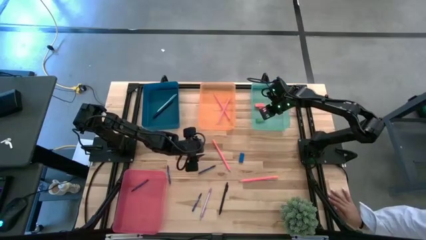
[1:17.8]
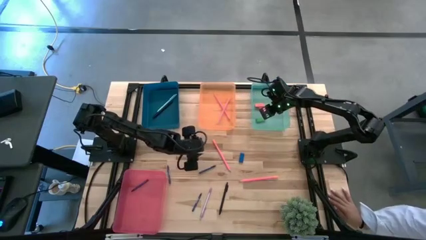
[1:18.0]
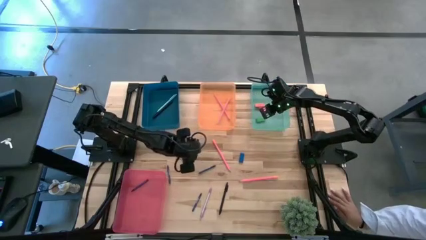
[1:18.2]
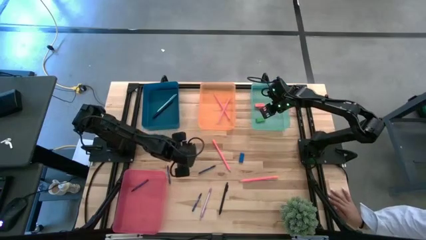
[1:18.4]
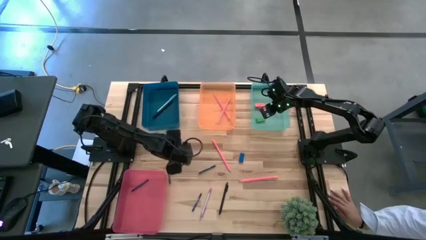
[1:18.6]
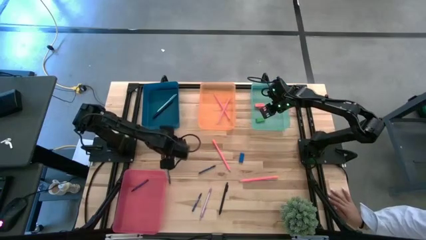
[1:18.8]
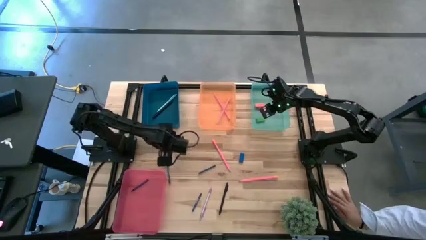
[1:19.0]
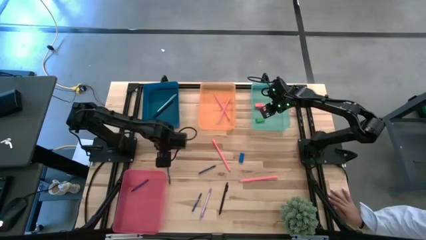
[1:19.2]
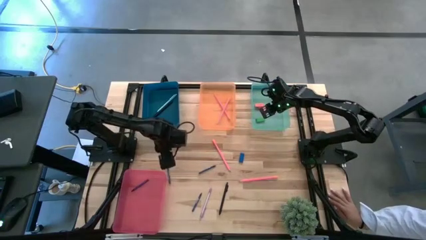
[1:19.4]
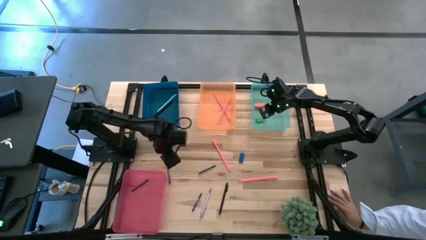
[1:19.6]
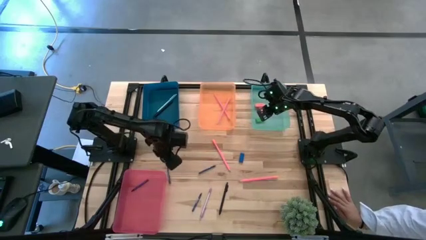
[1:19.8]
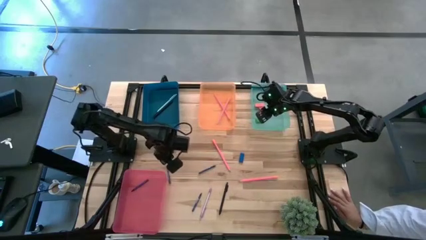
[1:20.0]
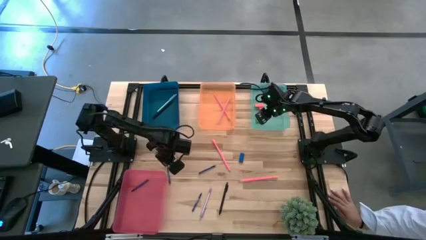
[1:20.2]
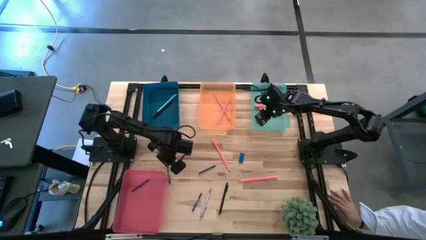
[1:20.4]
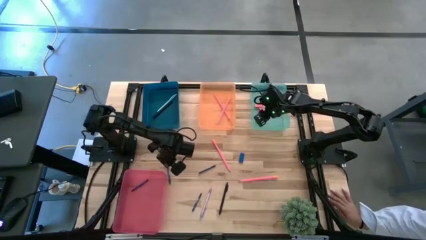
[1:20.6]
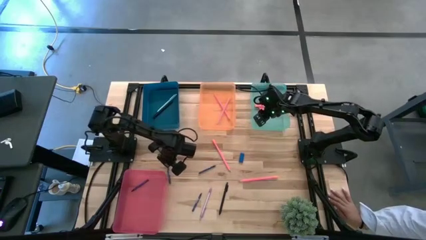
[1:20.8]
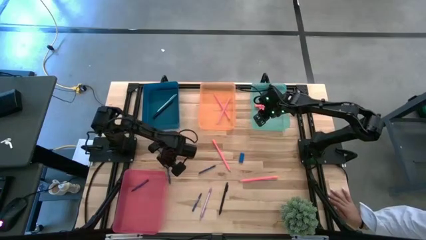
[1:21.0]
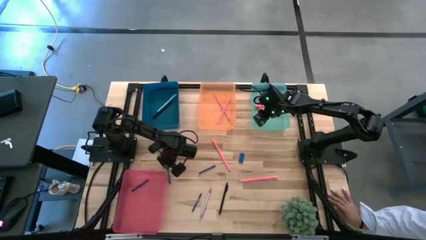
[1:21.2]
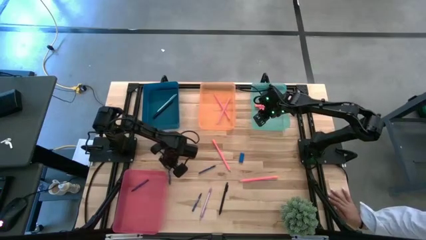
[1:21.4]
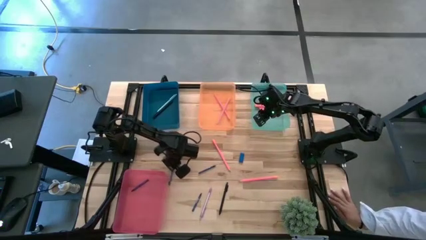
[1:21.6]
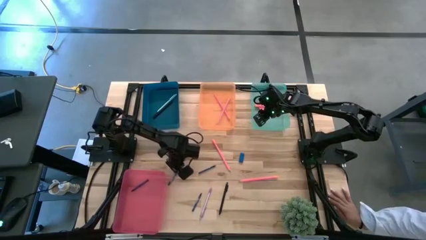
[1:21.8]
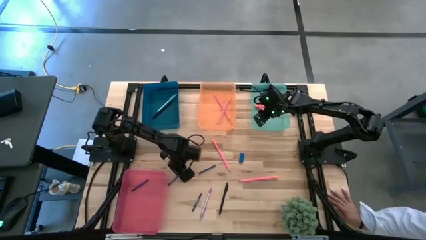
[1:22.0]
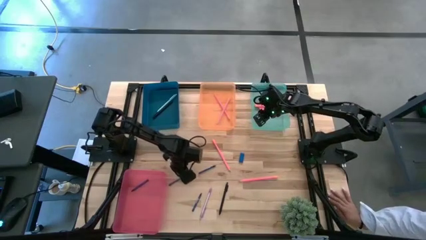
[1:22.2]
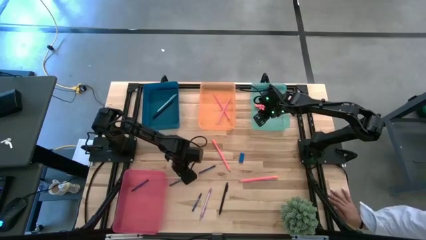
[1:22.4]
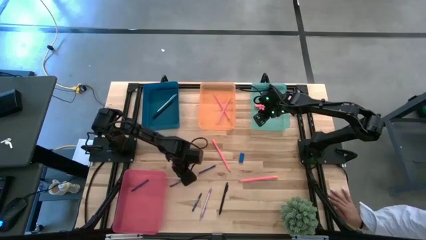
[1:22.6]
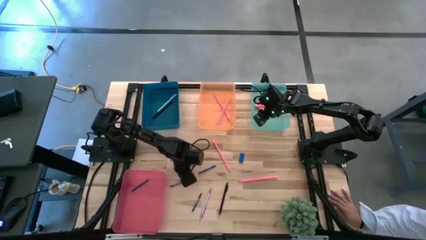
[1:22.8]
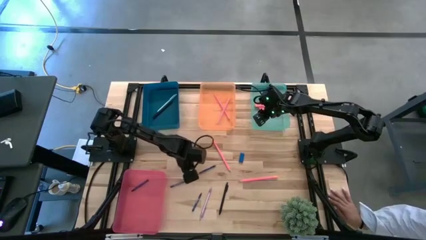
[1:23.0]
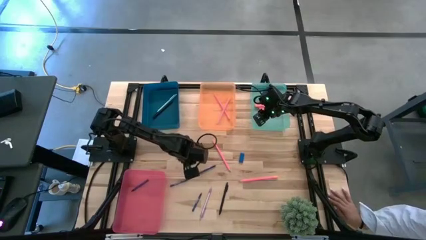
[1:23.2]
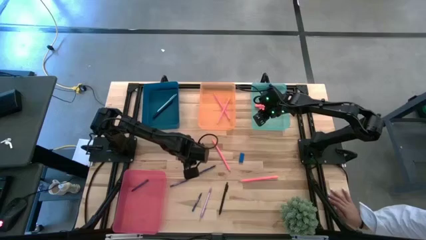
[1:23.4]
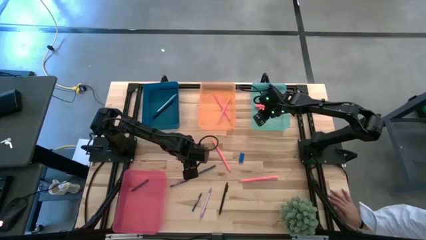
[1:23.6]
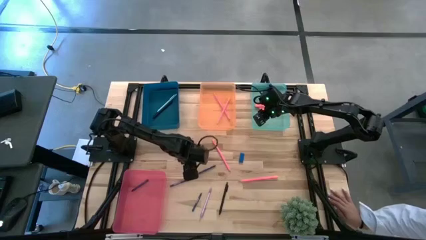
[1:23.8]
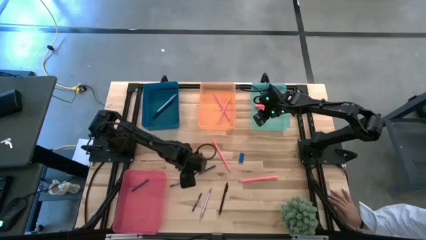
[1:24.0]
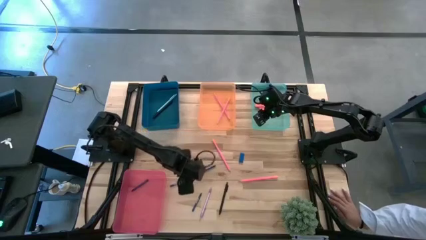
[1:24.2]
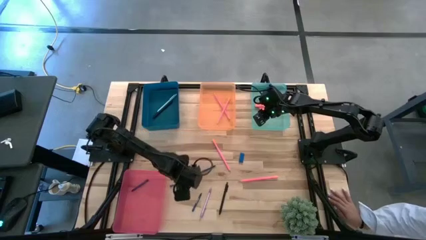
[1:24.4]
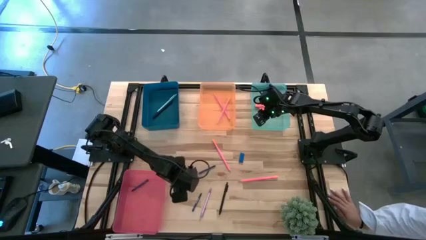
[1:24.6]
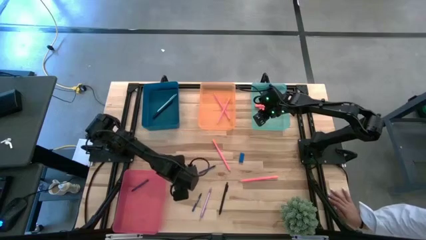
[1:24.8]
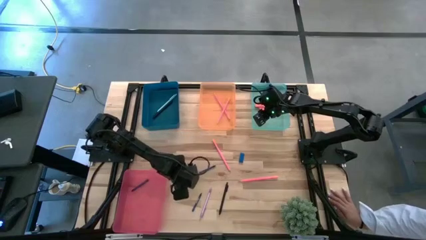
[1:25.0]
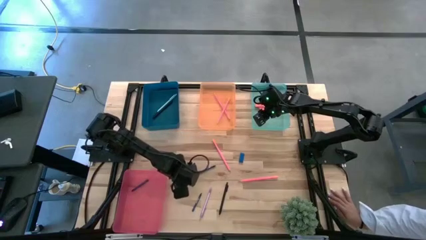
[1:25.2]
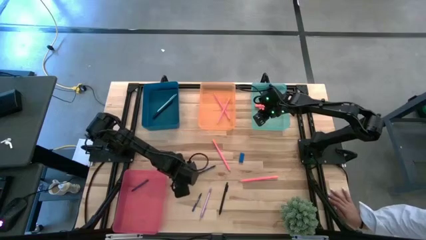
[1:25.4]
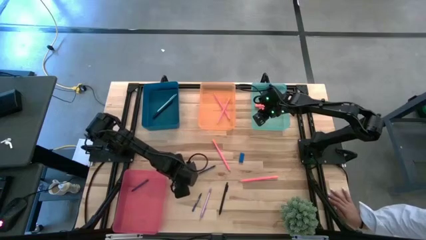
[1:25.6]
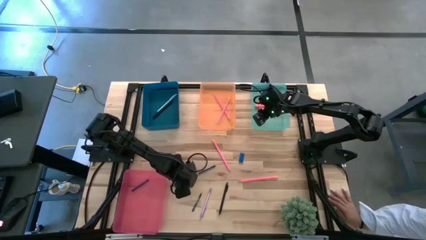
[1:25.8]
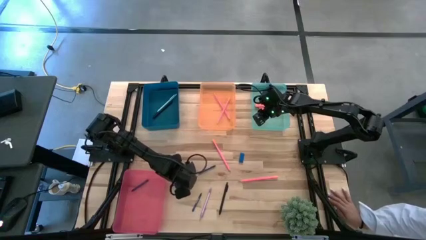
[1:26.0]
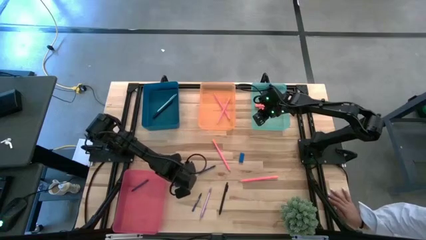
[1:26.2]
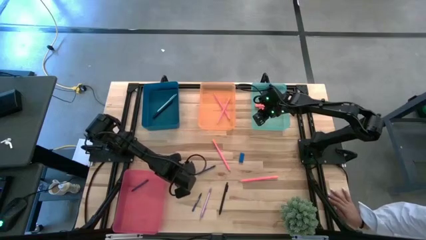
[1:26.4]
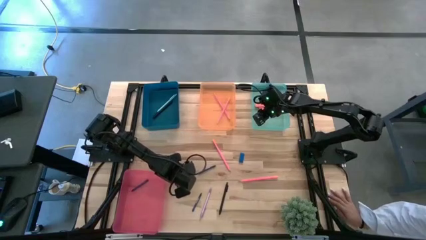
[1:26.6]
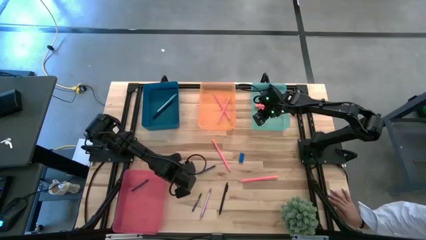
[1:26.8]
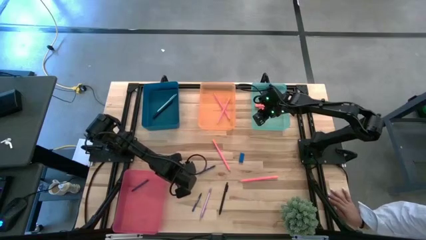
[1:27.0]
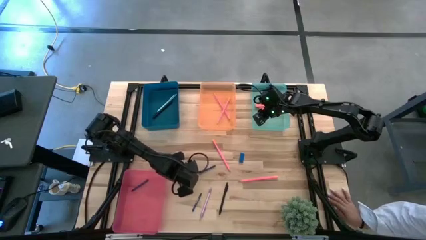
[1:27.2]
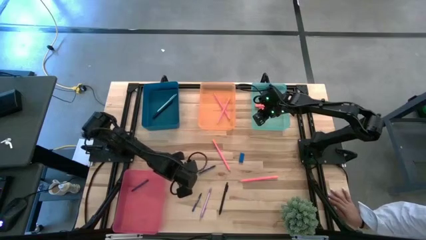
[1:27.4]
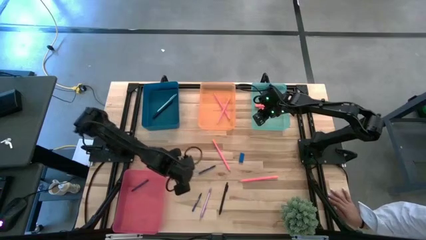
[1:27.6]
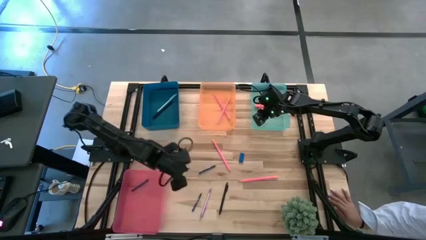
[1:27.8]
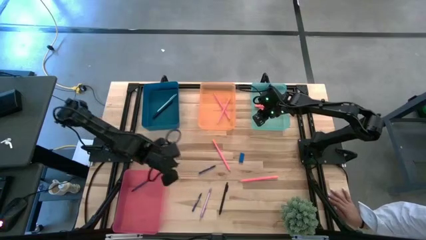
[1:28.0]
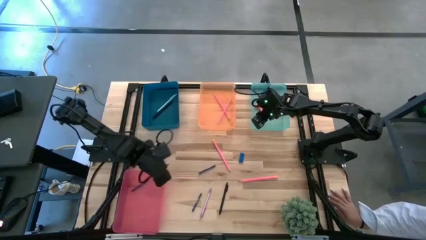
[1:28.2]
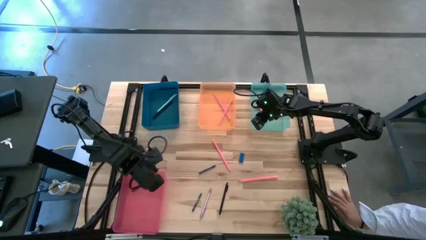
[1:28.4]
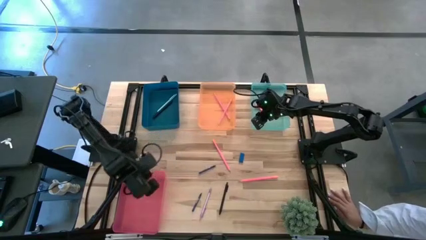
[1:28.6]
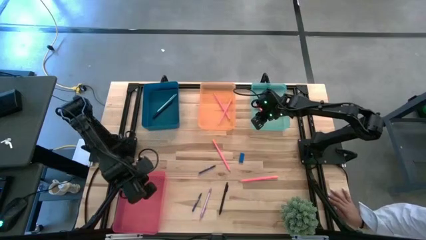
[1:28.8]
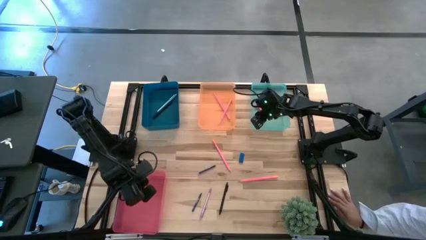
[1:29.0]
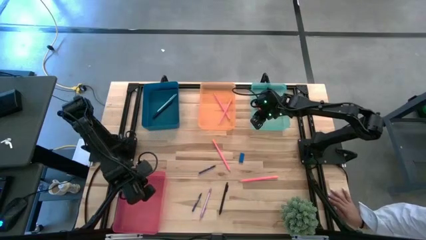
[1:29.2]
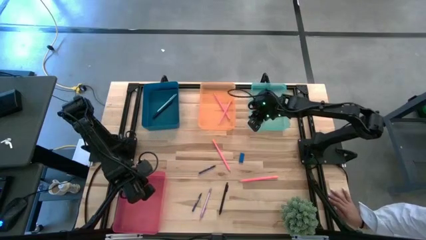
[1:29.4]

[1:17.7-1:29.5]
Task: Sort crayons/erasers/pens/pencils in bins
Put the top left crayon into the pink bin

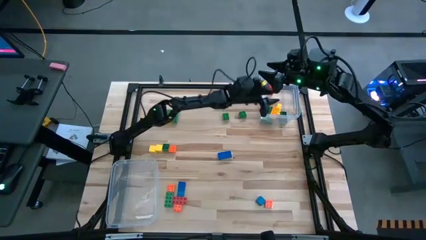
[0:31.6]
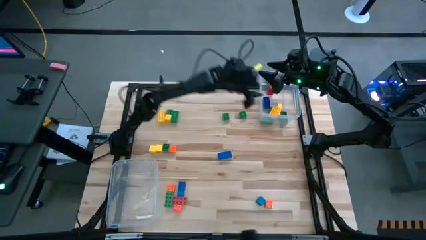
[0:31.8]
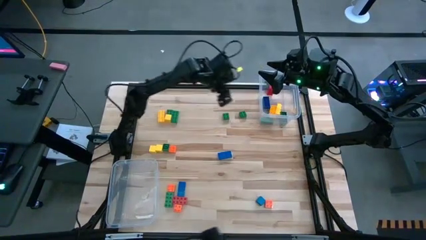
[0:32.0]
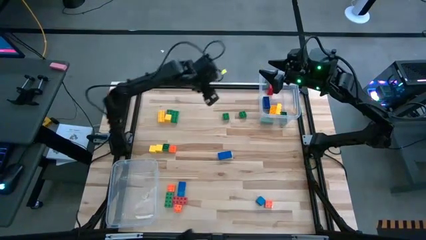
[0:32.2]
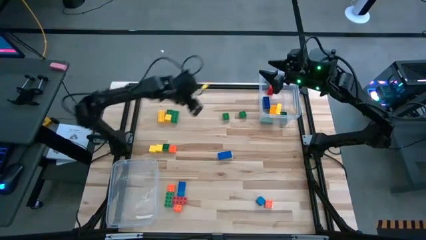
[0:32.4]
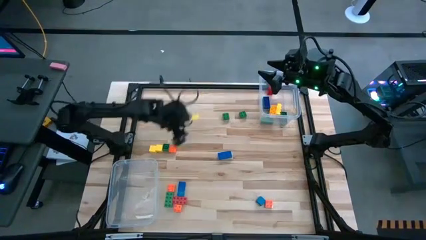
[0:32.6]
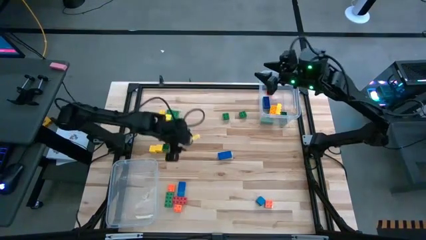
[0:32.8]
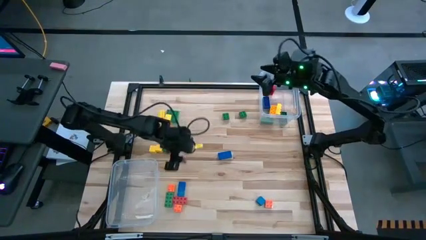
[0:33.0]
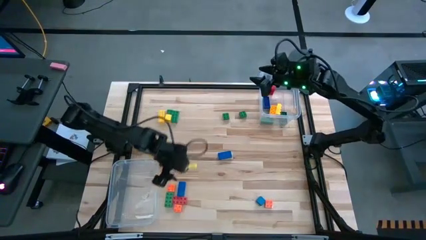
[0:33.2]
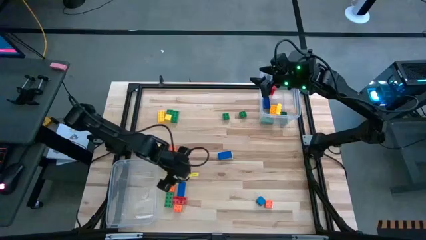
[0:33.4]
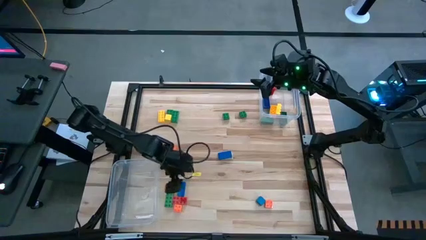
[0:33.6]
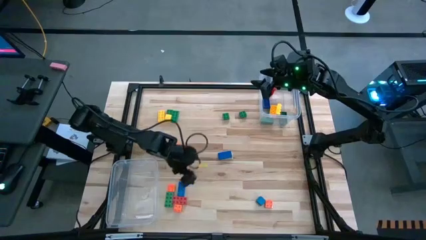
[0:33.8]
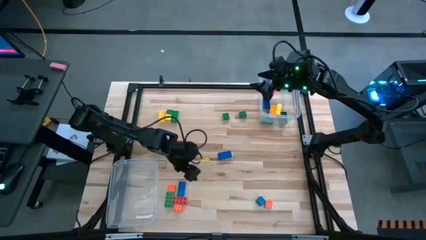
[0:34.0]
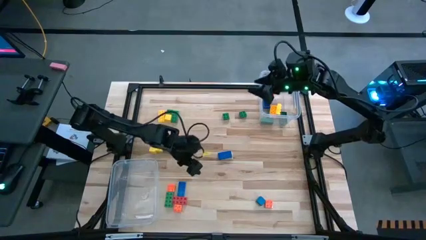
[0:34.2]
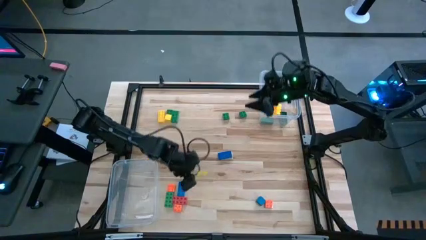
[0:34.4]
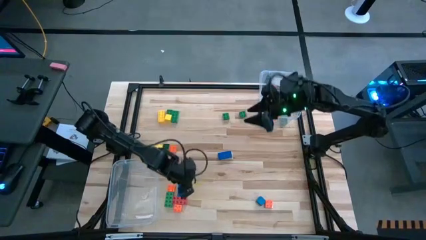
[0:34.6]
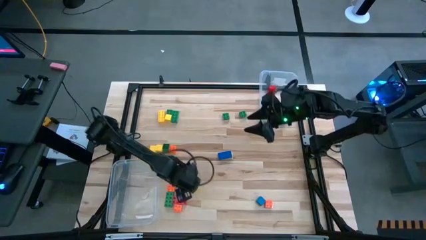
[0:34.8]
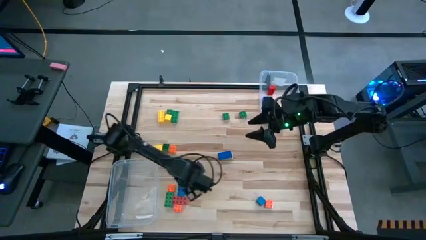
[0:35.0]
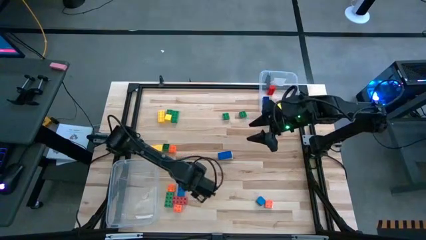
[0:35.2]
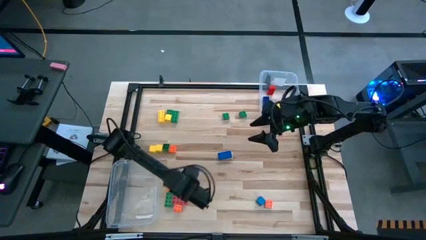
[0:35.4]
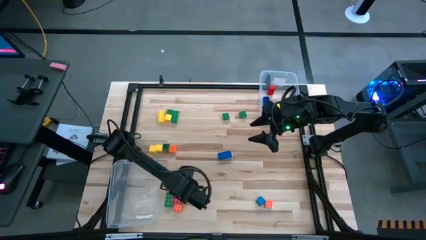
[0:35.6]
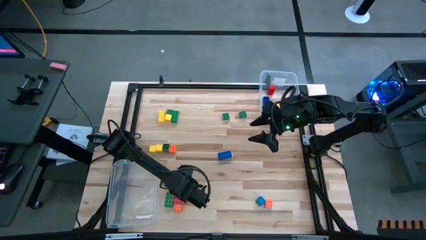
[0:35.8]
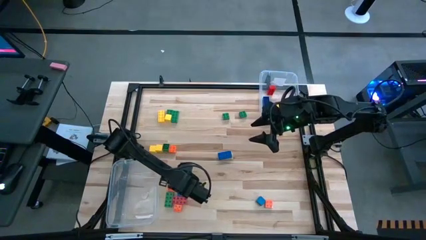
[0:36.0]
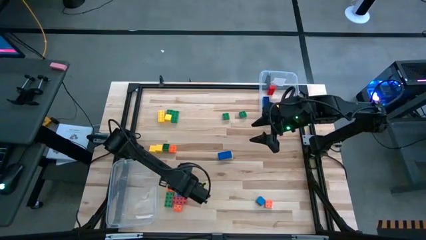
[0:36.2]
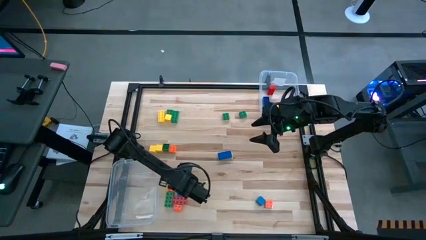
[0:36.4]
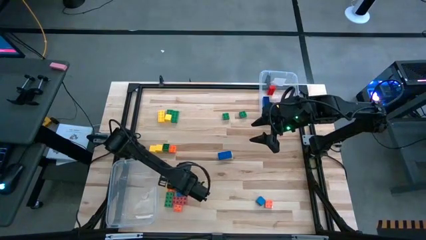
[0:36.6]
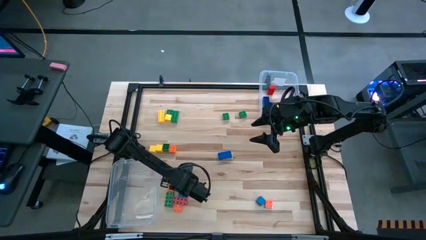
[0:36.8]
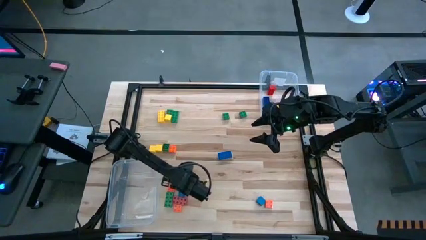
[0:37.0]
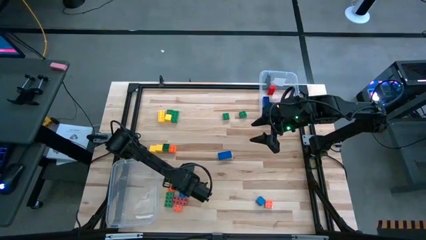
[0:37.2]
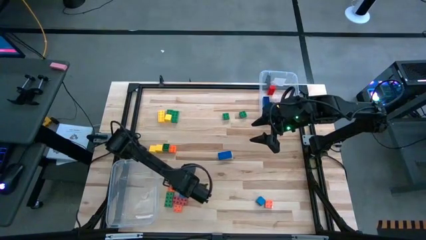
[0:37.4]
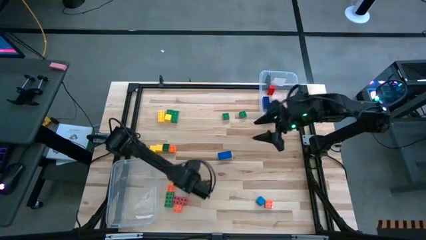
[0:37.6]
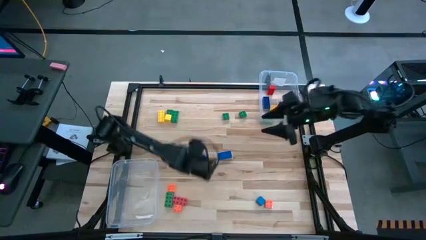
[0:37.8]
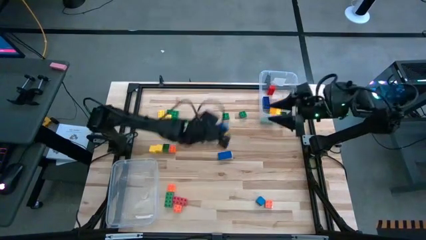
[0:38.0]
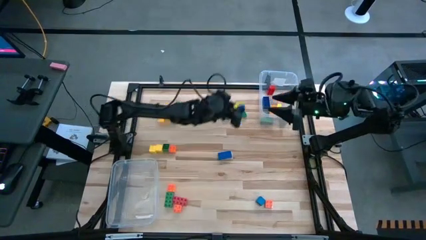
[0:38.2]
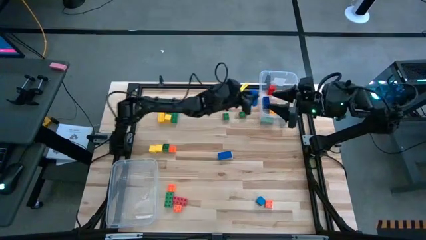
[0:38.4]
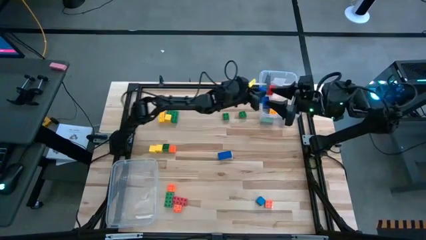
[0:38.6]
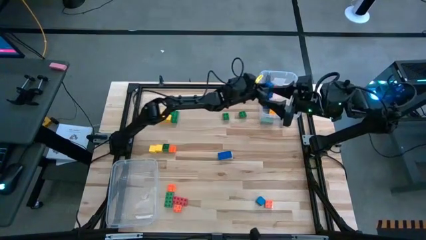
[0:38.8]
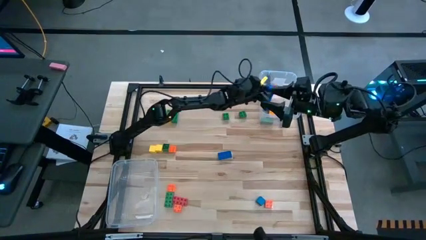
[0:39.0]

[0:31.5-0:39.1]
Task: Sort blocks by size
Put the left large blue game piece into the right transparent bin
